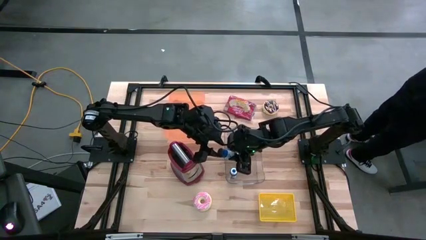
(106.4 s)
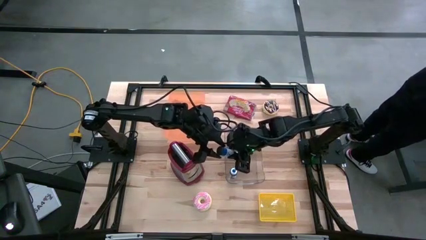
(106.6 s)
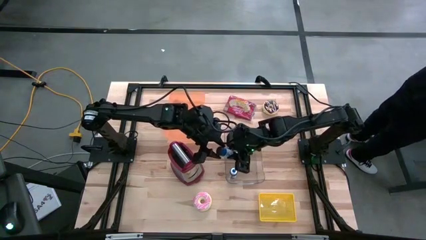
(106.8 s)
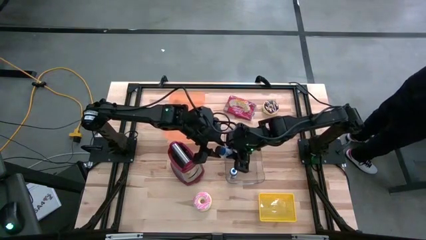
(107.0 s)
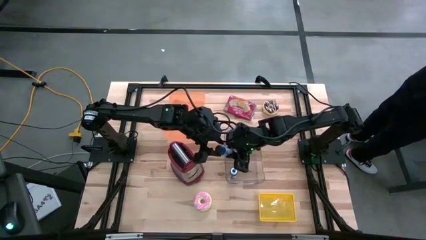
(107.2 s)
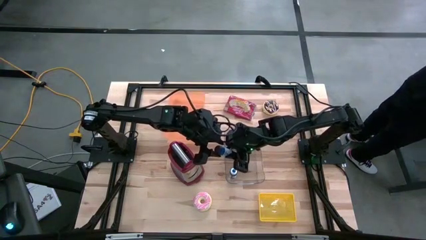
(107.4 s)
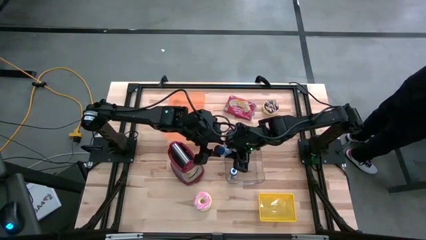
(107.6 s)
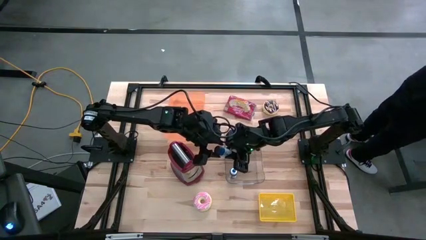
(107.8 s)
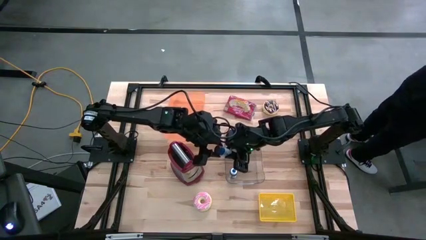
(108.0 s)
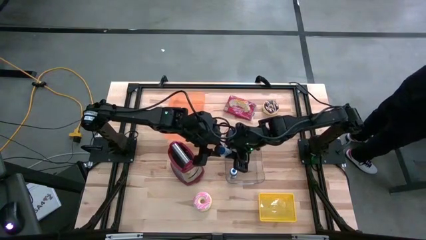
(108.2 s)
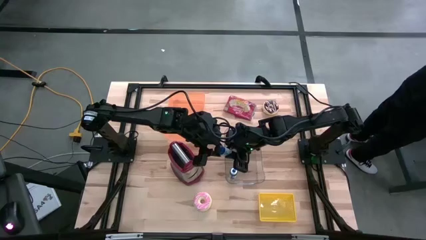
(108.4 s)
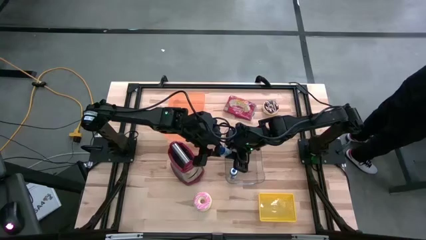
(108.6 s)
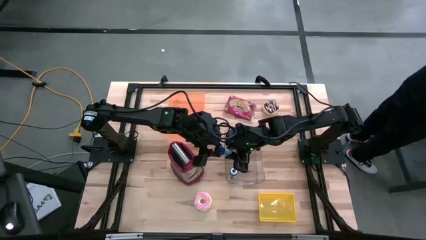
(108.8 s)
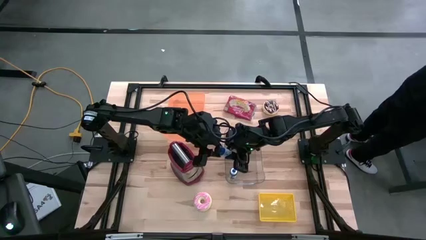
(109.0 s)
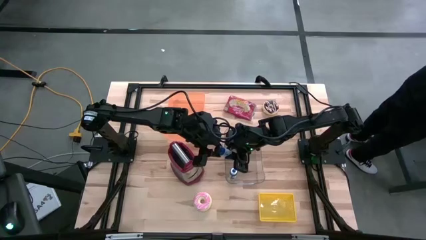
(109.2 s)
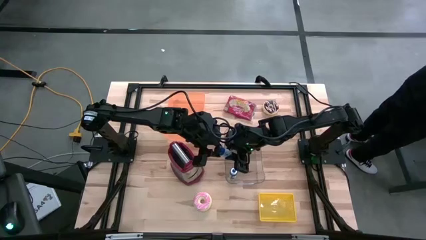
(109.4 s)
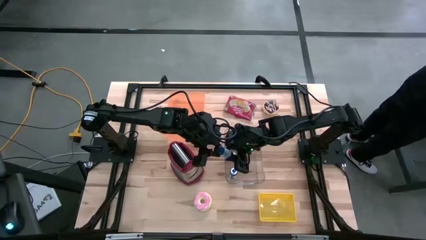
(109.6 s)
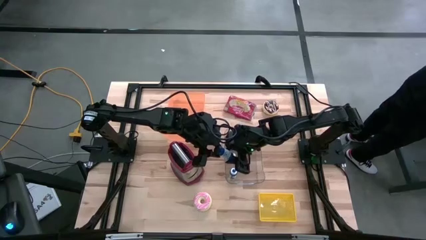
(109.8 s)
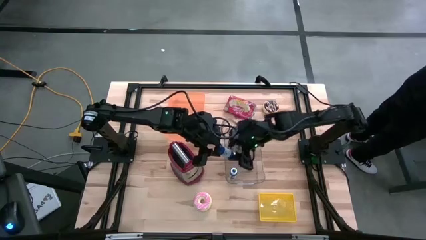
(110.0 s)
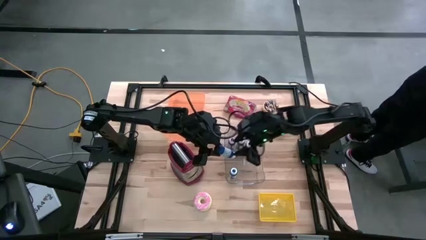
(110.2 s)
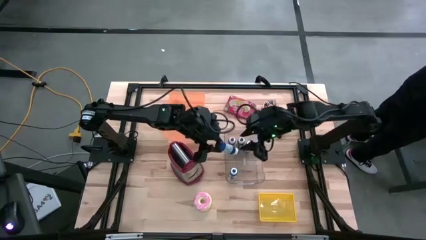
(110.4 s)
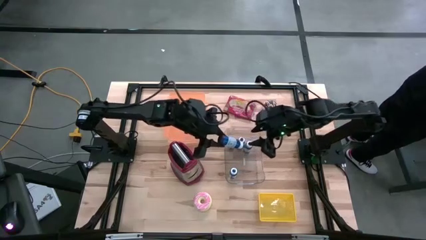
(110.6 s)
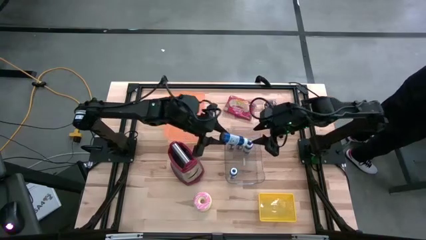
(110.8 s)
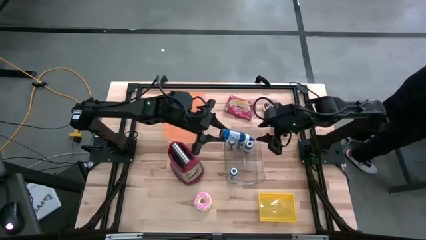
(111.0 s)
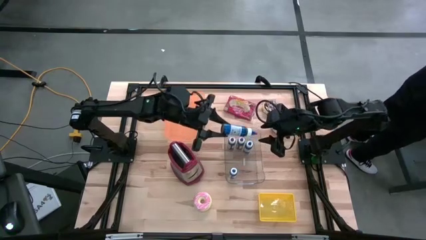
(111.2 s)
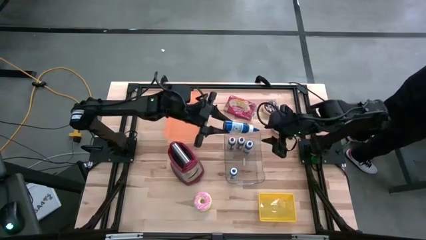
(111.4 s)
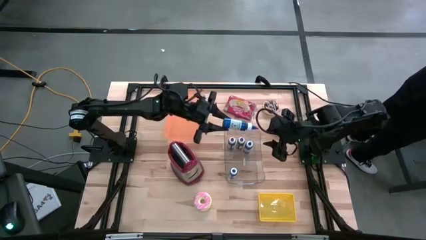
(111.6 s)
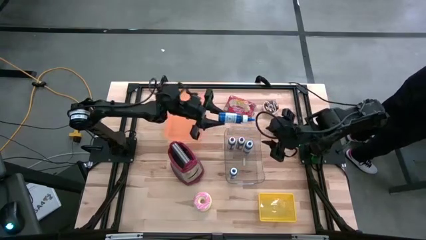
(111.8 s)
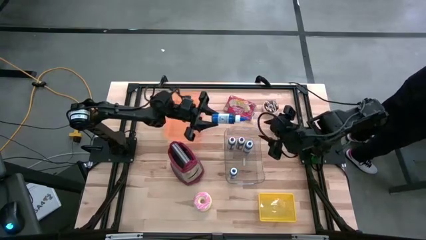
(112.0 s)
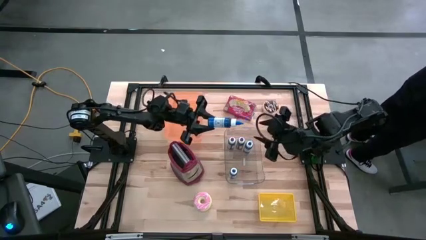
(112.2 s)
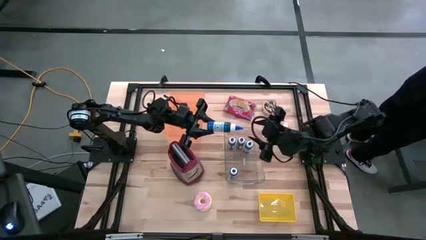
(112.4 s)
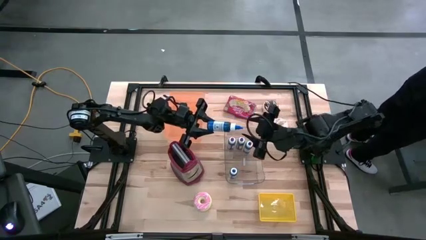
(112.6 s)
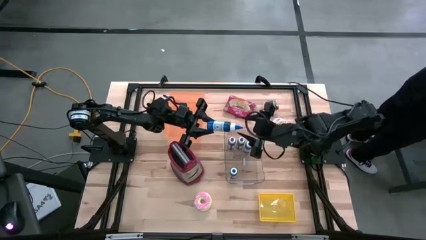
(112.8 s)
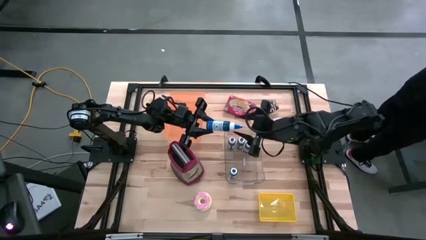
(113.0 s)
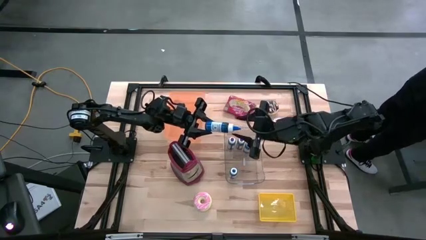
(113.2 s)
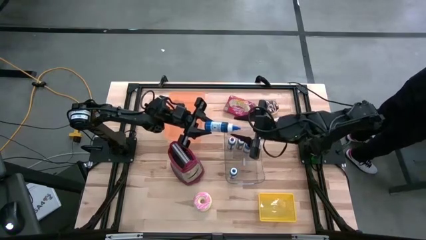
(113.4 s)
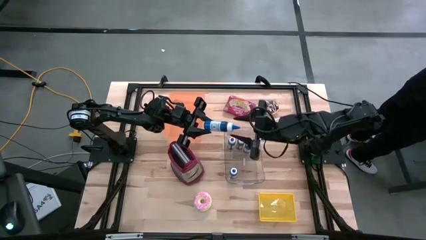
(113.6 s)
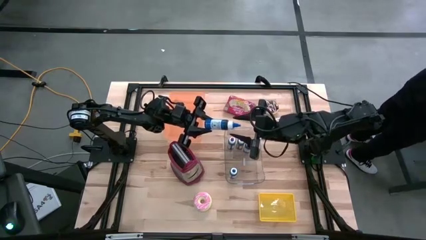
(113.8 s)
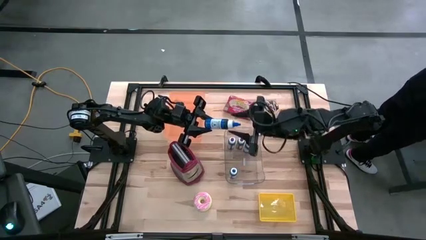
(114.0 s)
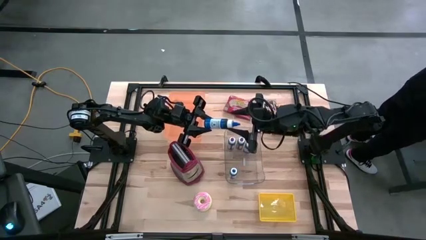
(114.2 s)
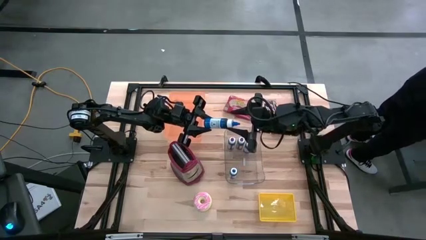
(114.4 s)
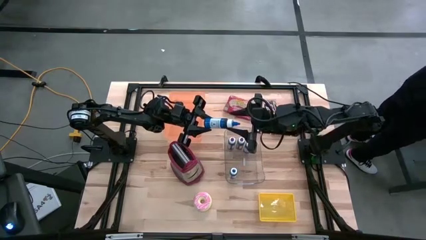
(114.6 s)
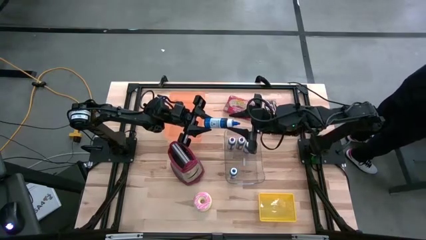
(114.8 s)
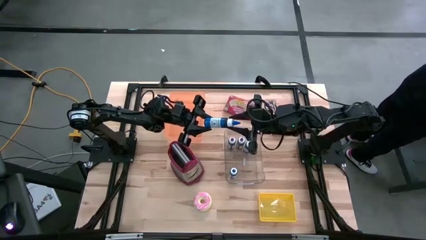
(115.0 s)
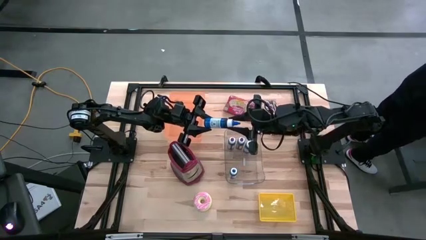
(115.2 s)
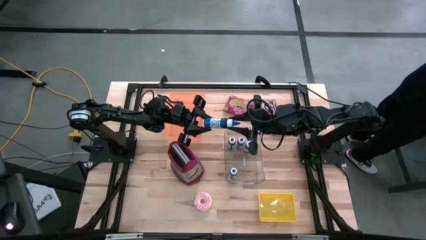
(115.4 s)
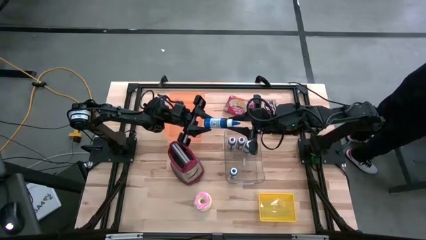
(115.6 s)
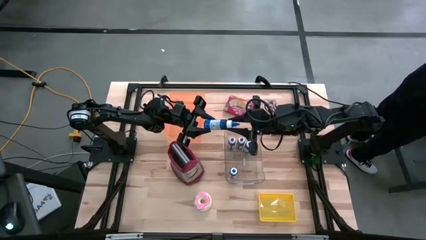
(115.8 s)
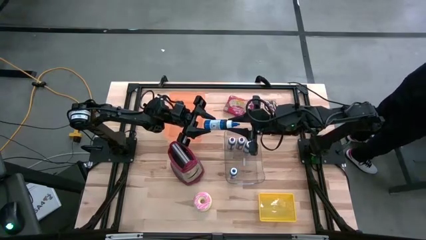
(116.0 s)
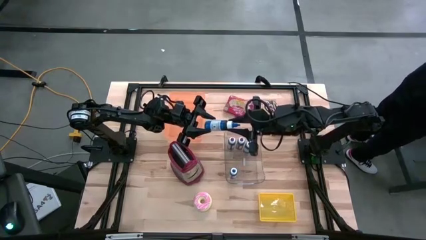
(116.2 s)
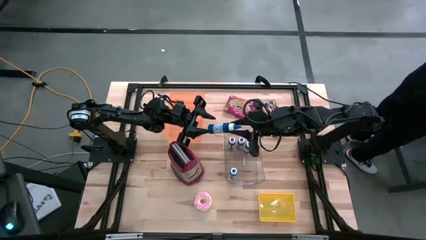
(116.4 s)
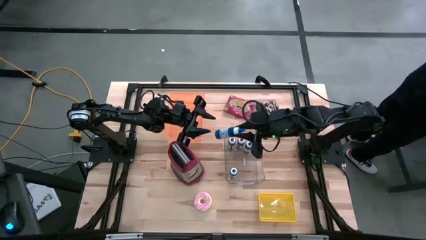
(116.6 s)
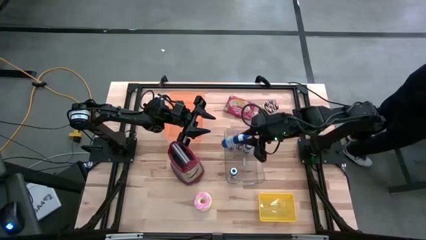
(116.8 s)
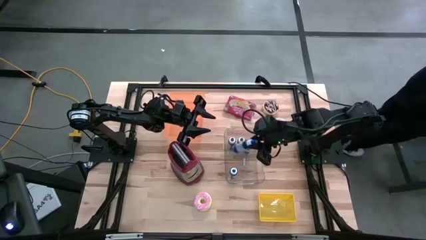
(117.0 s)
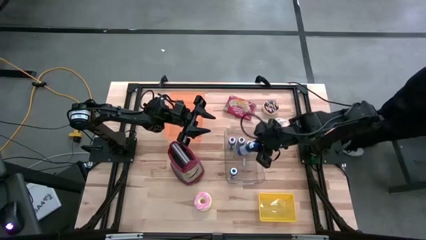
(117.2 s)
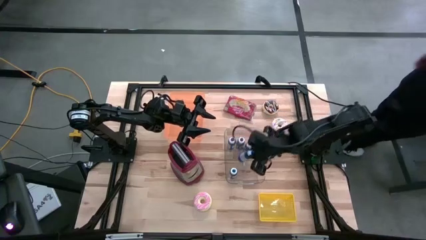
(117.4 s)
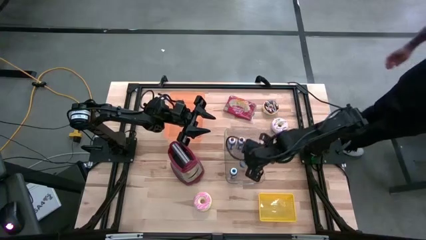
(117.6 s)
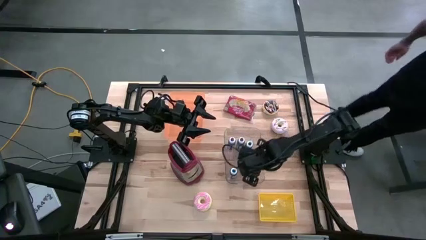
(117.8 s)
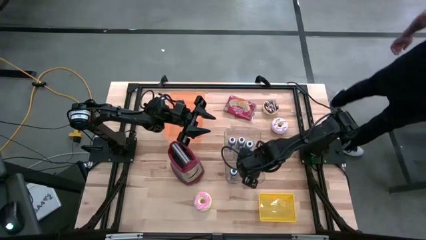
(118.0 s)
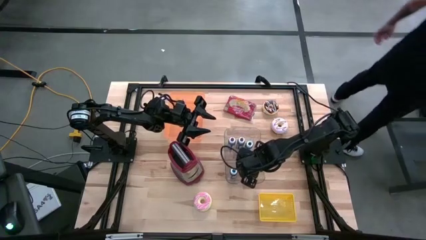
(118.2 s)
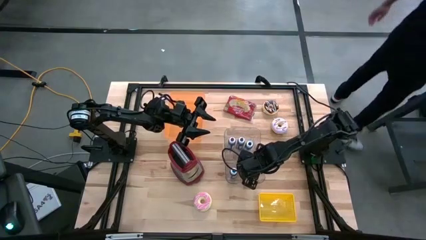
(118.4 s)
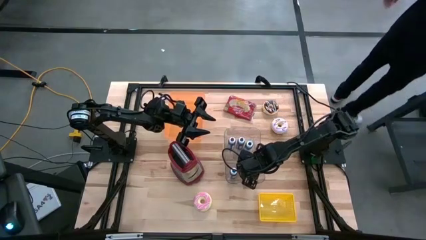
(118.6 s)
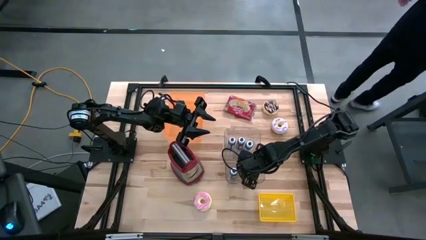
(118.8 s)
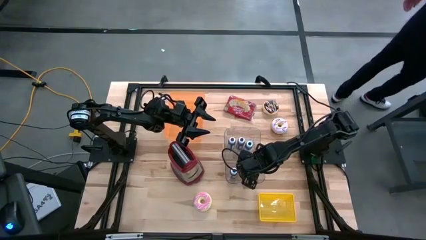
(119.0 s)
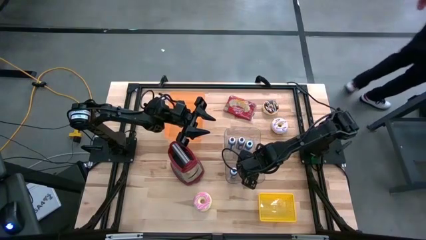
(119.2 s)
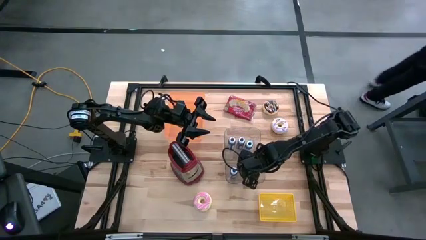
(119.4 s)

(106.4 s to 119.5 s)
Task: Pick & Place Food Item
Put the blue food coloring bottle into the transparent bin
